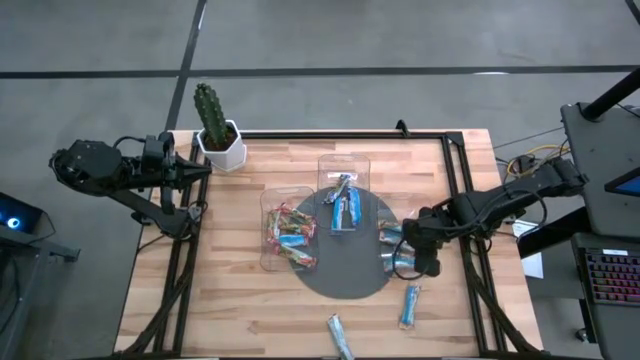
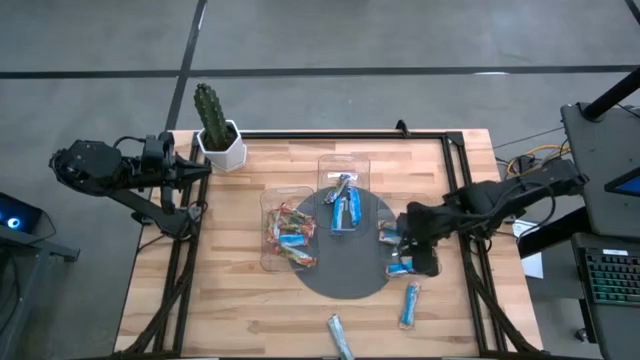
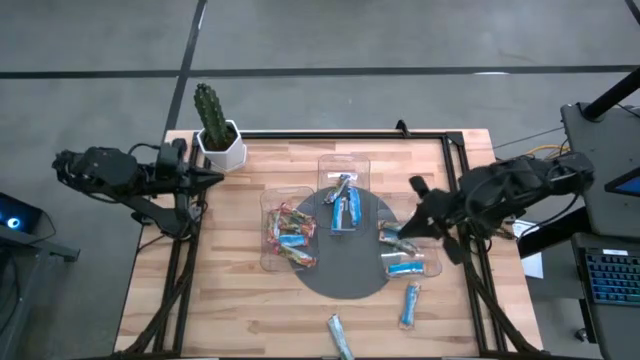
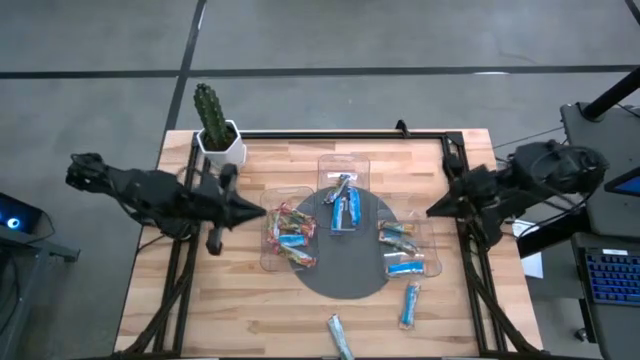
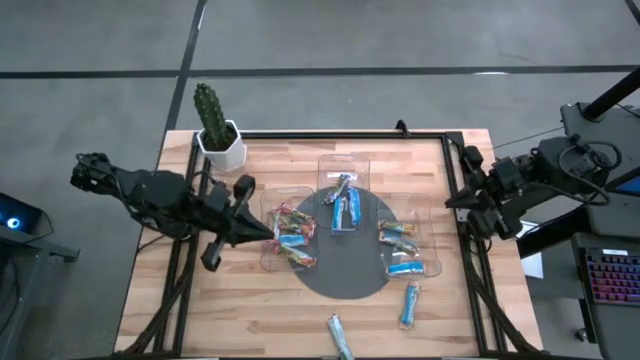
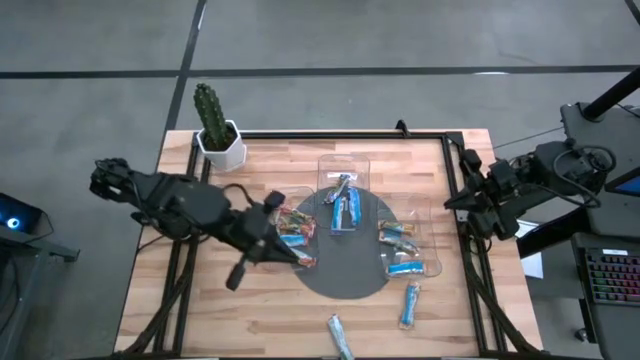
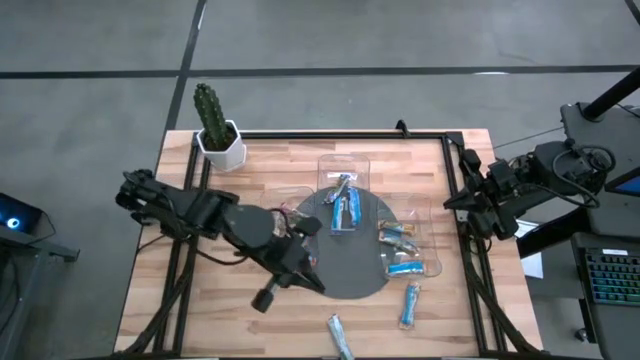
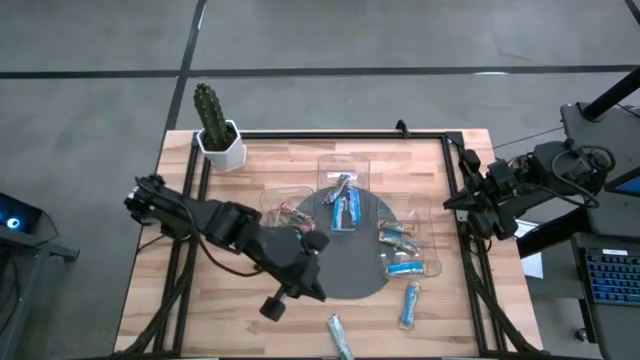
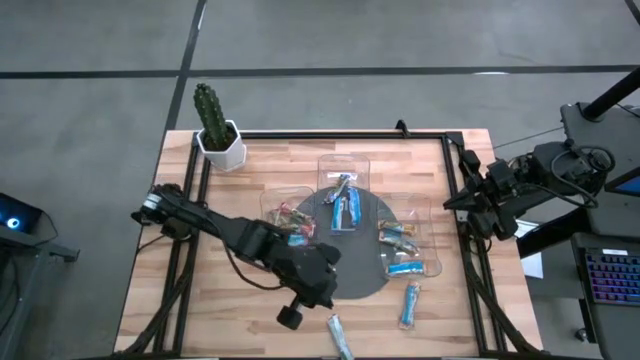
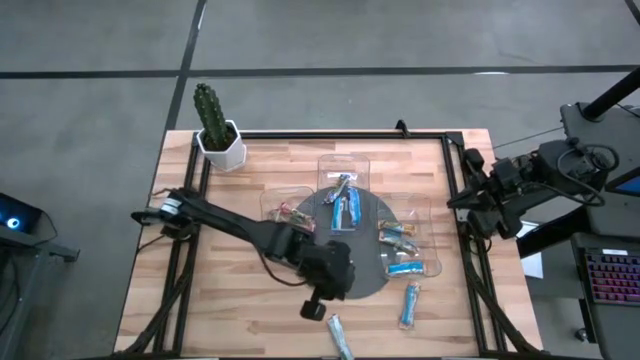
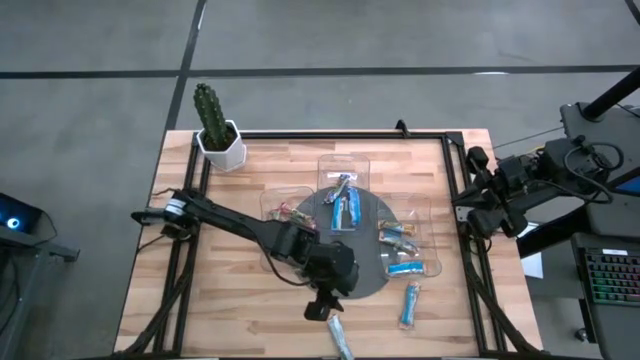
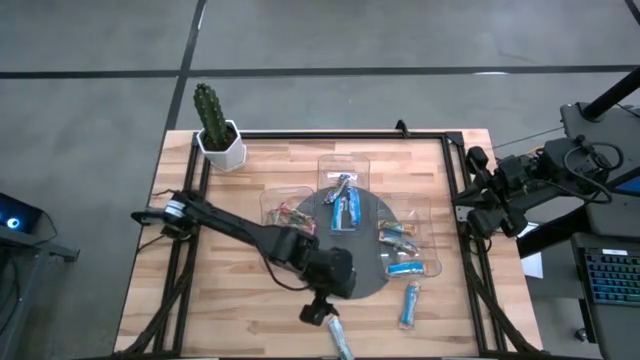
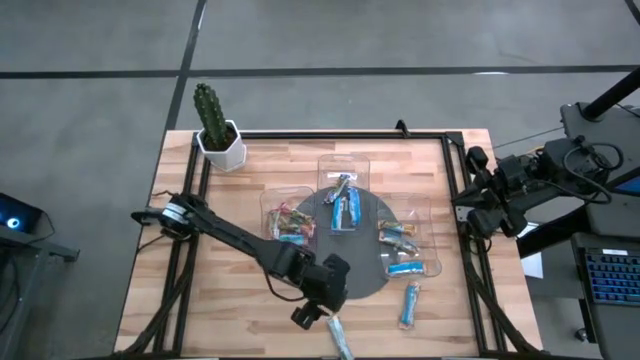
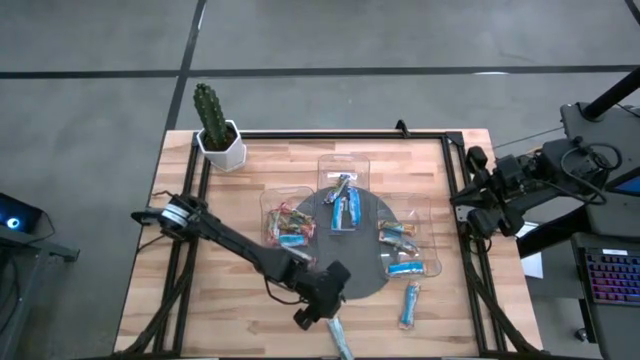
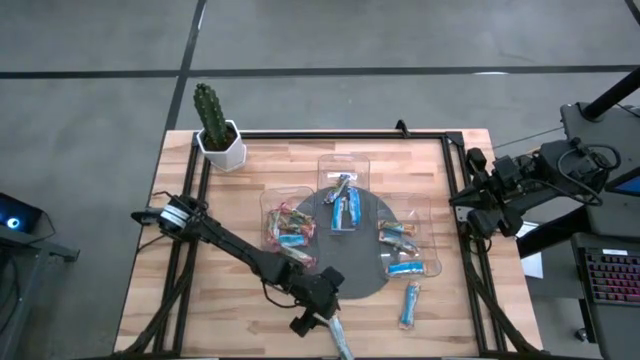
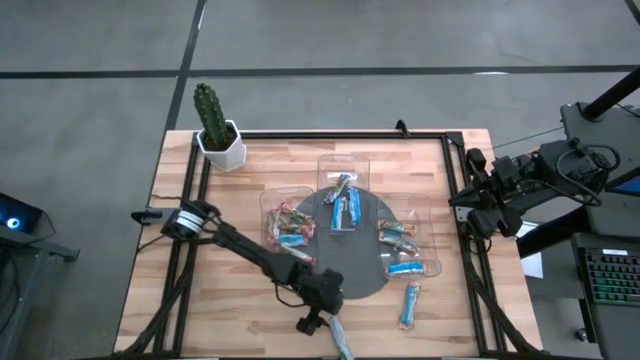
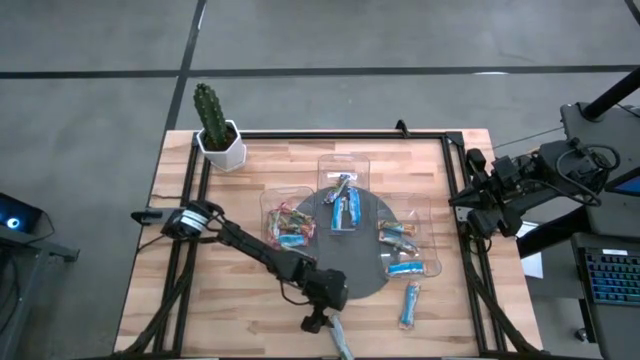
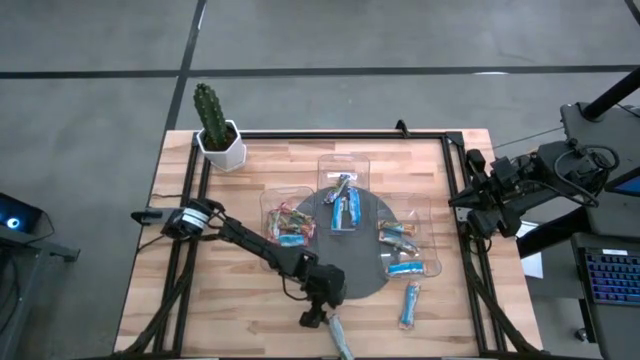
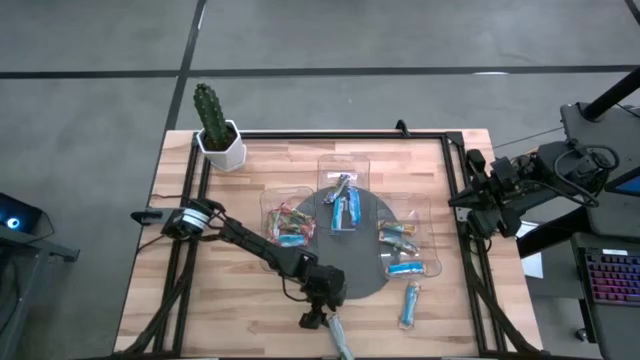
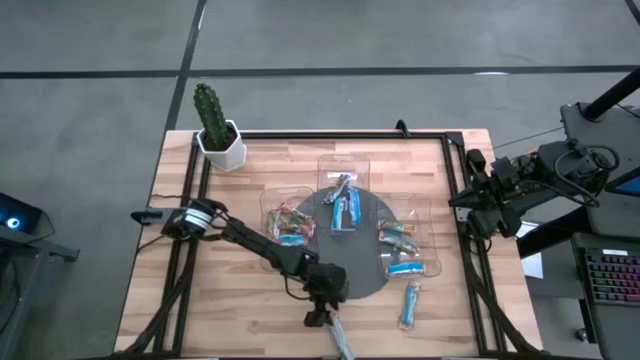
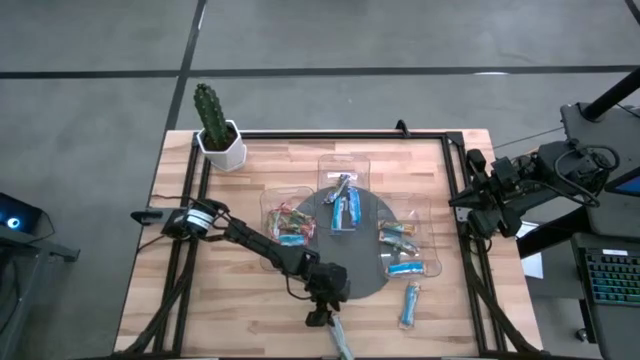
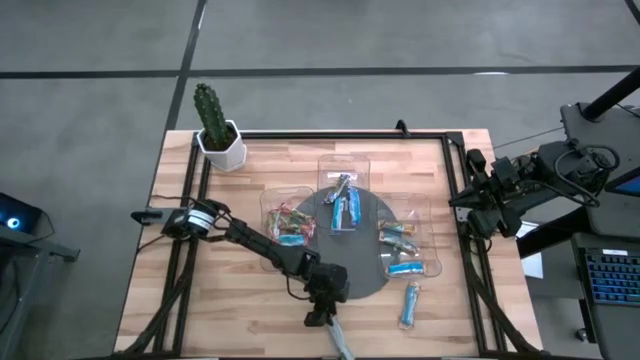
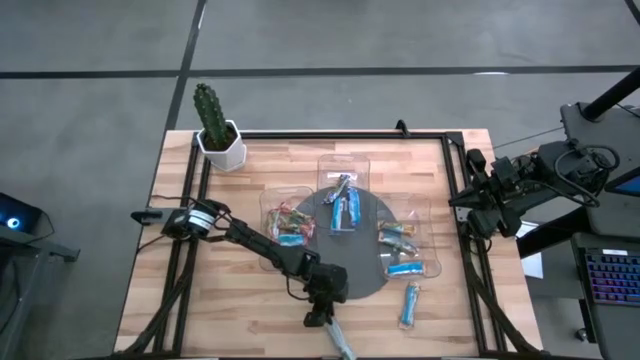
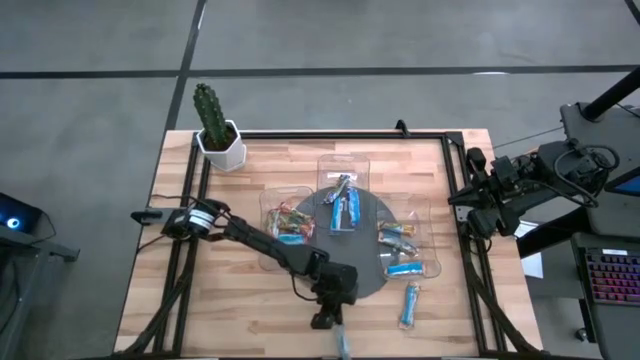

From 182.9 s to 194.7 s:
Task: Pick and place Granola Bars by type
Put the yellow granola bar into the right transparent bin

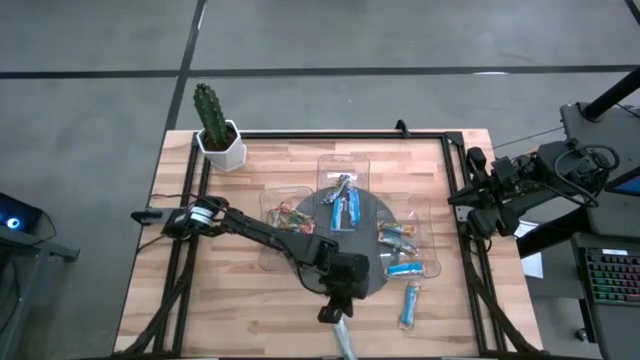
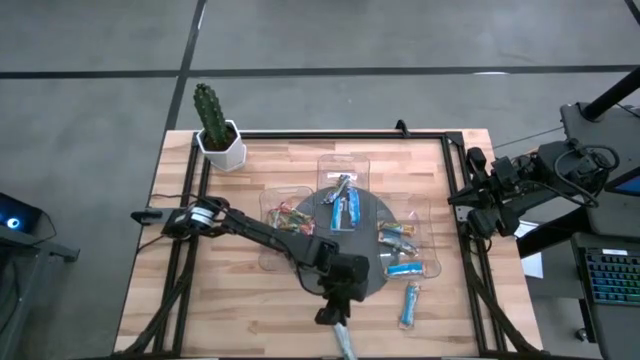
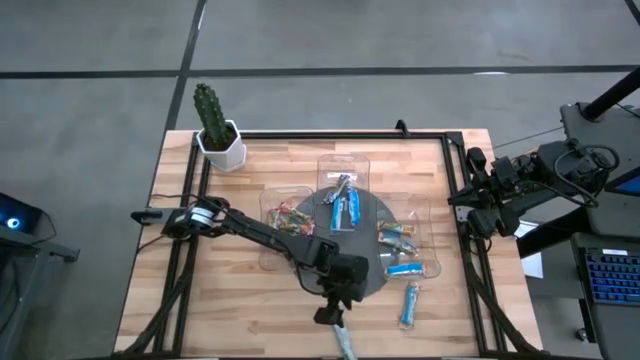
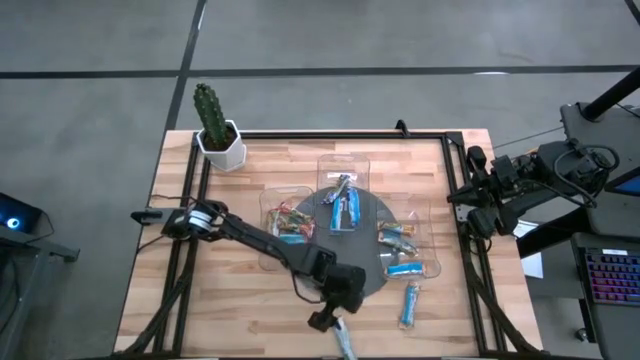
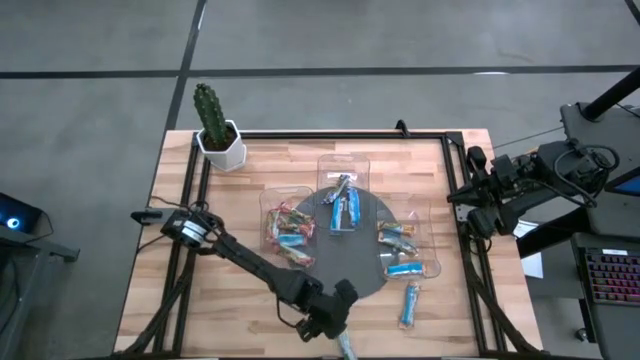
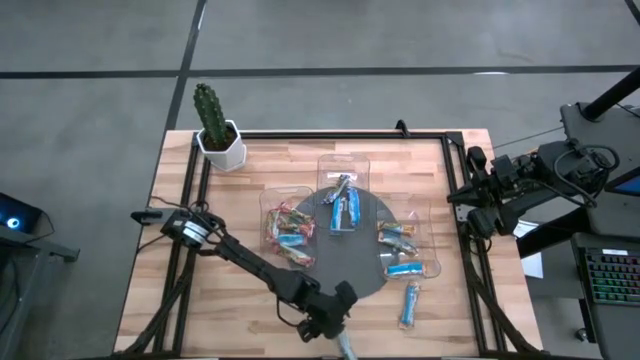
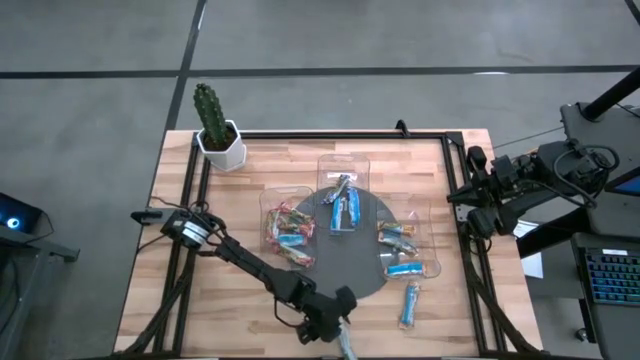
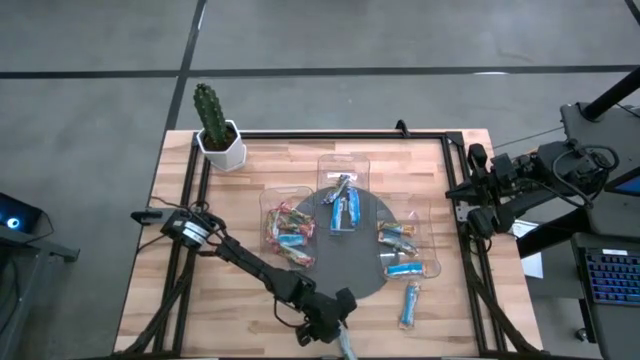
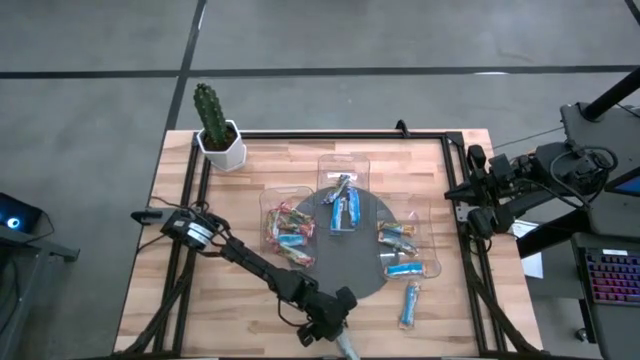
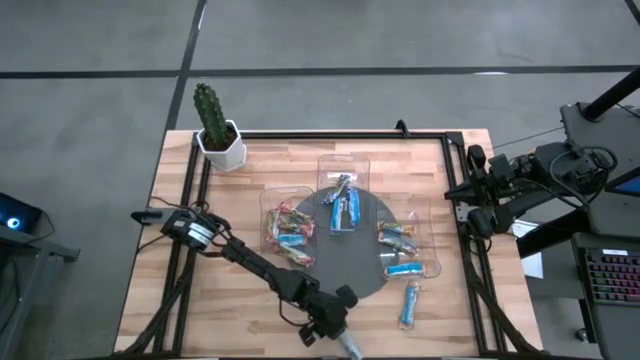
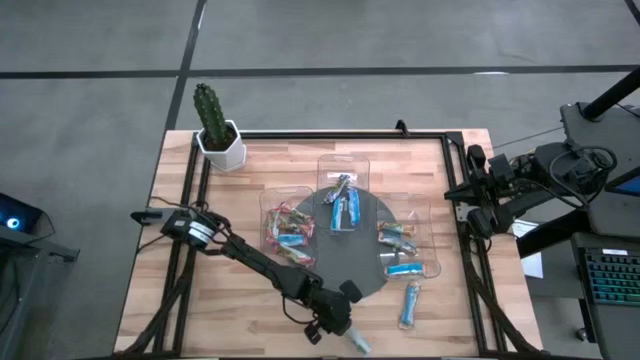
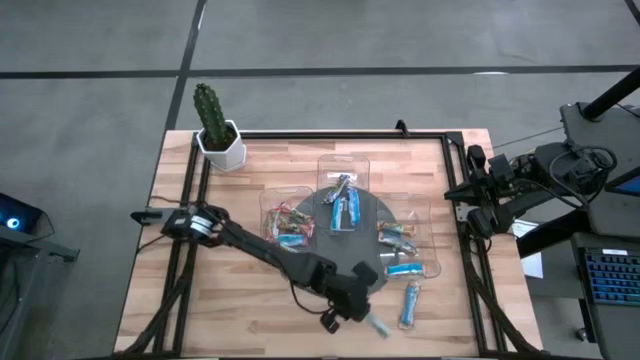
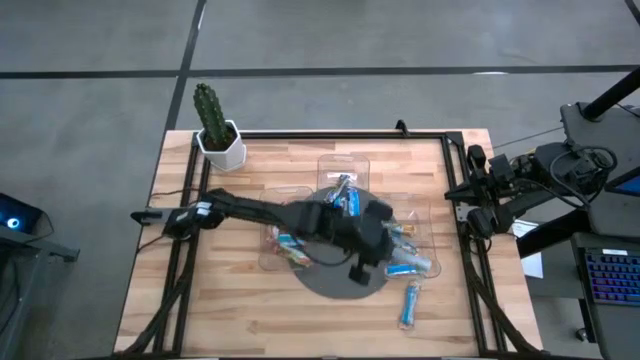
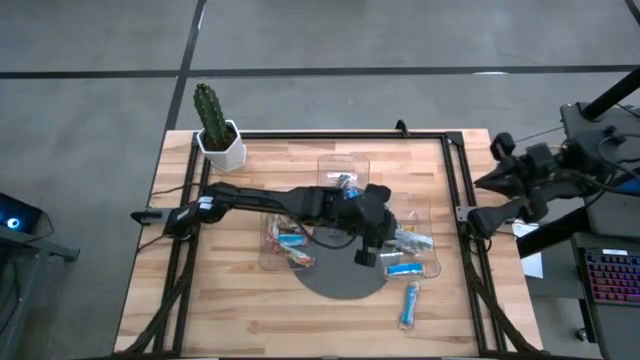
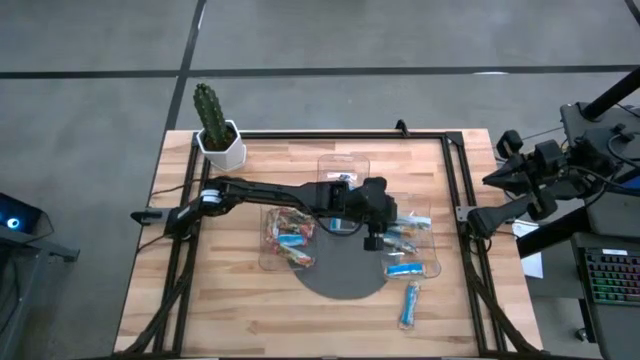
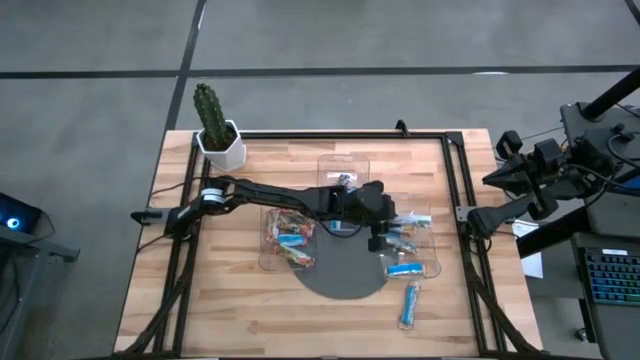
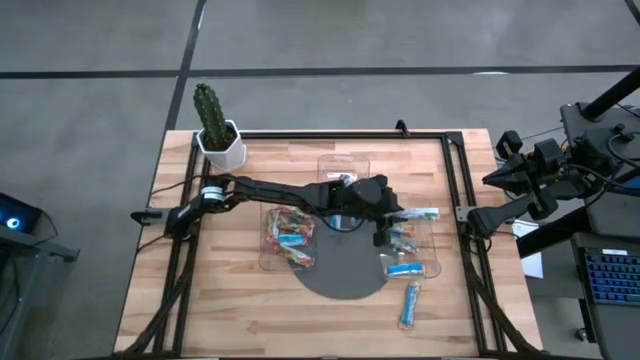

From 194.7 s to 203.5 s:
Put the yellow granola bar into the right transparent bin
